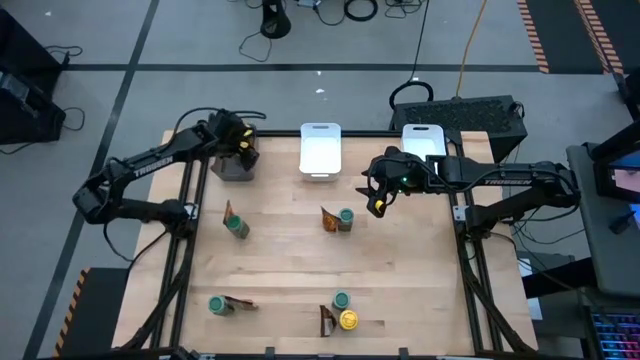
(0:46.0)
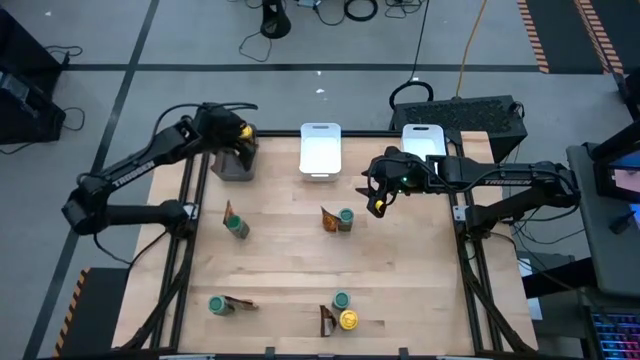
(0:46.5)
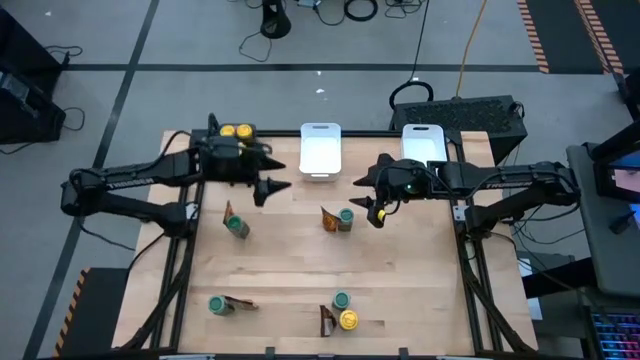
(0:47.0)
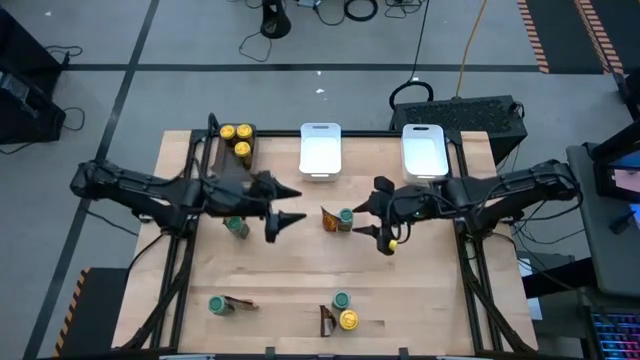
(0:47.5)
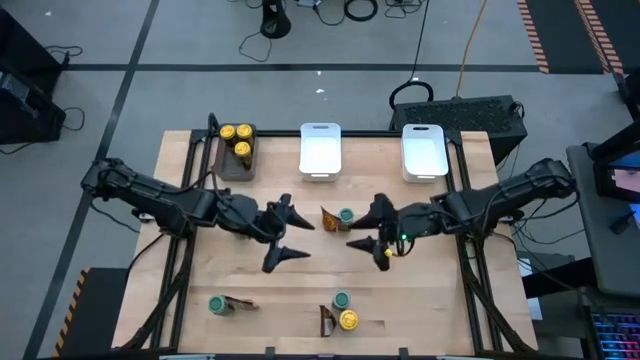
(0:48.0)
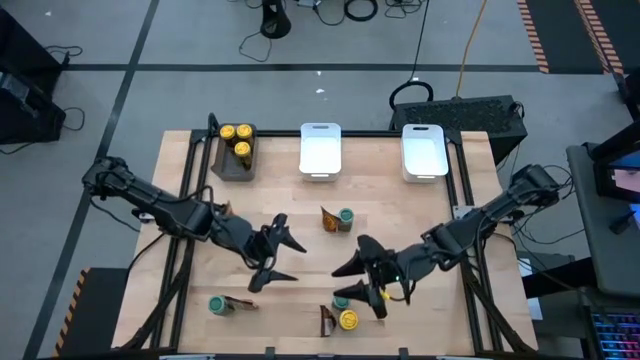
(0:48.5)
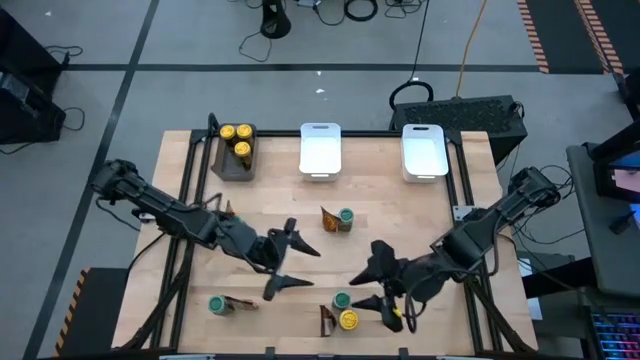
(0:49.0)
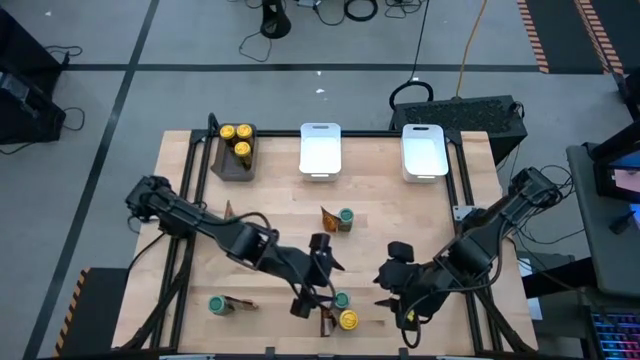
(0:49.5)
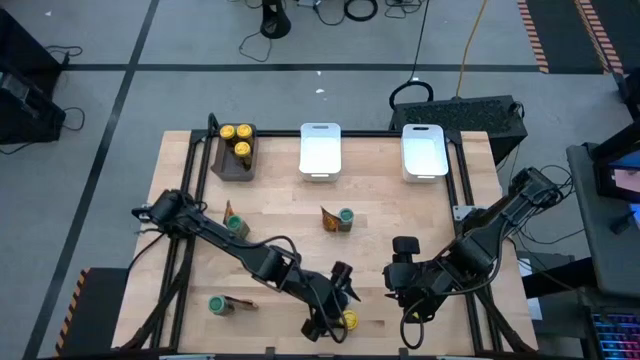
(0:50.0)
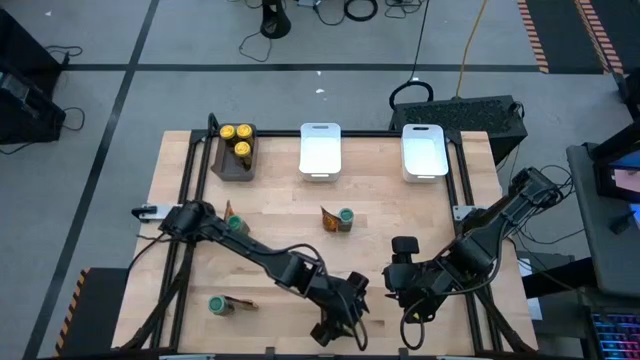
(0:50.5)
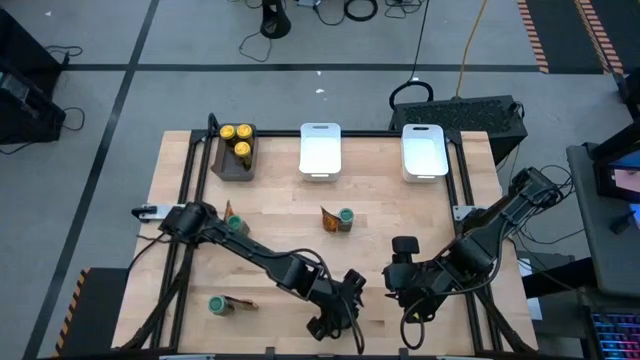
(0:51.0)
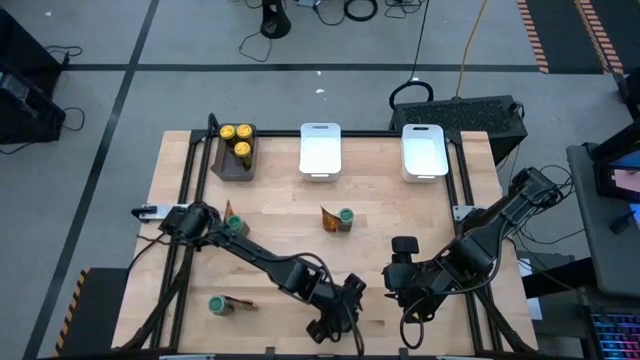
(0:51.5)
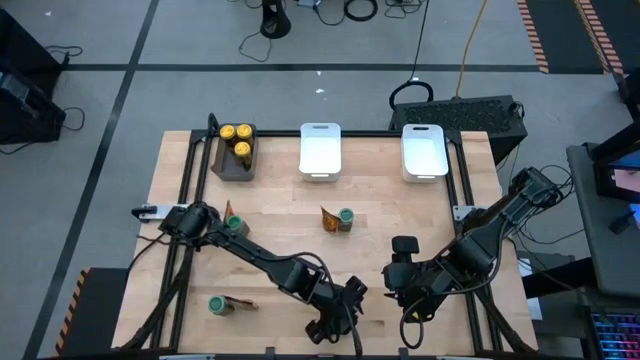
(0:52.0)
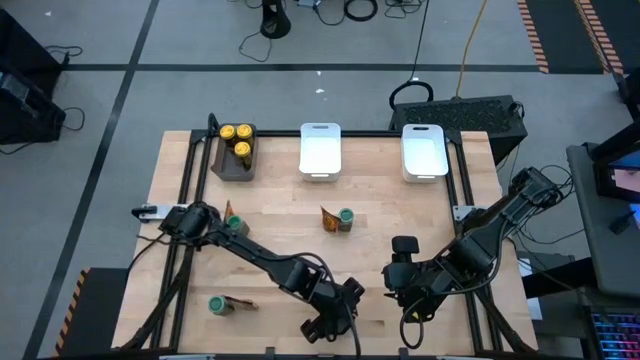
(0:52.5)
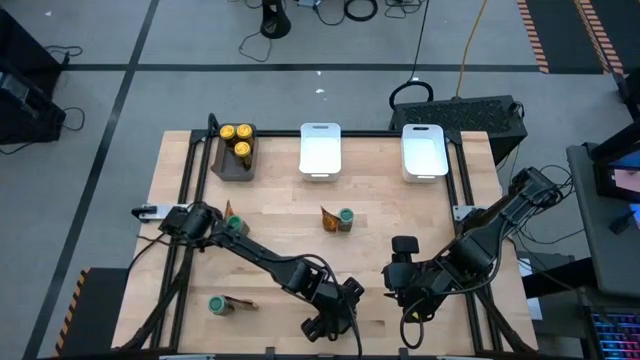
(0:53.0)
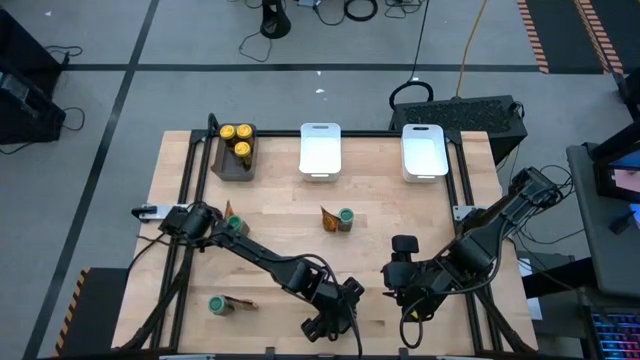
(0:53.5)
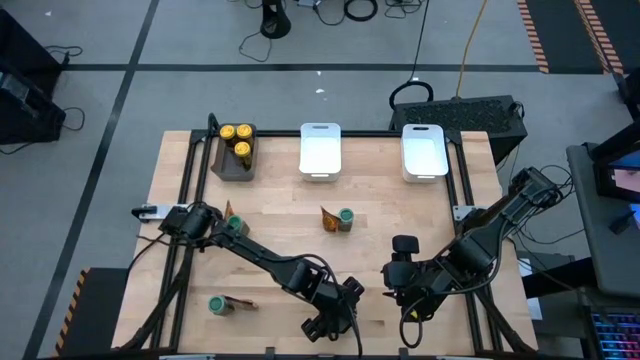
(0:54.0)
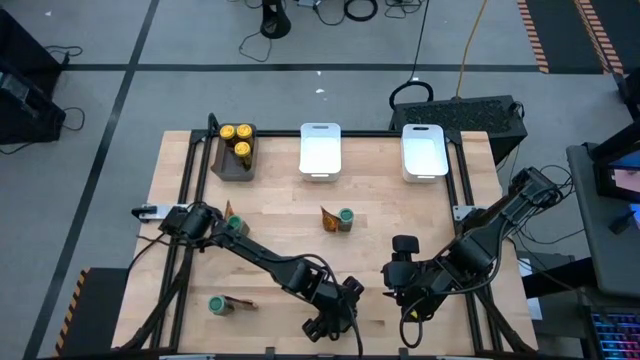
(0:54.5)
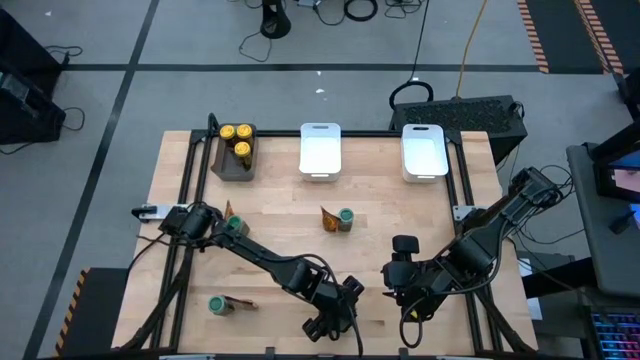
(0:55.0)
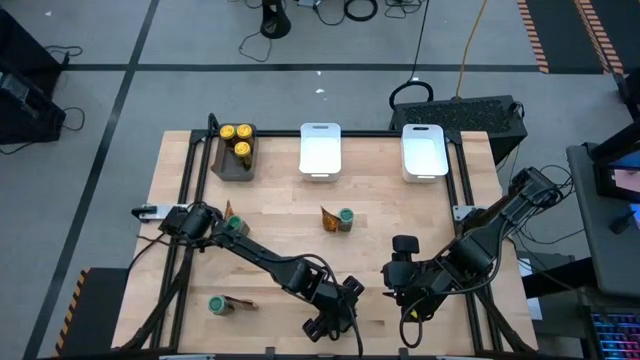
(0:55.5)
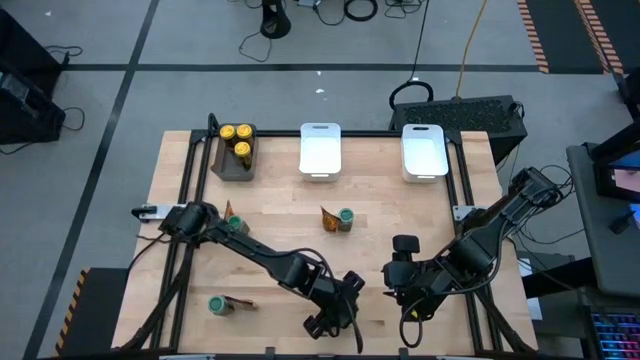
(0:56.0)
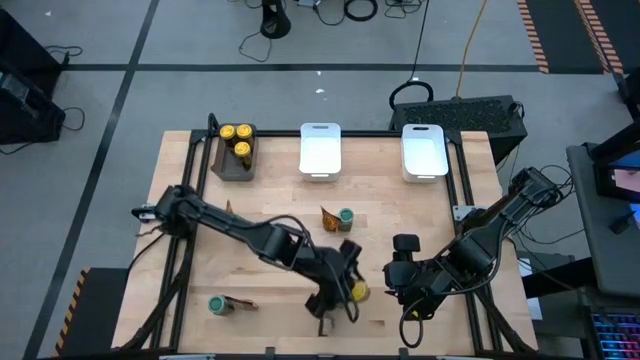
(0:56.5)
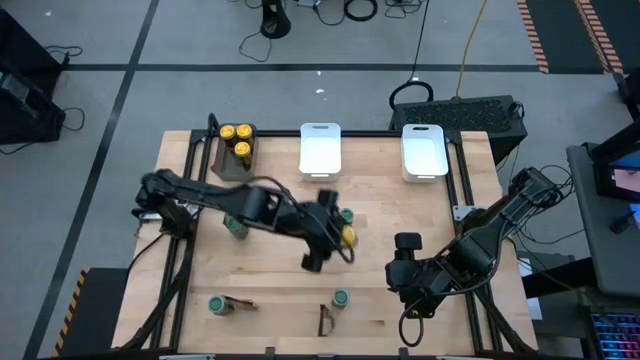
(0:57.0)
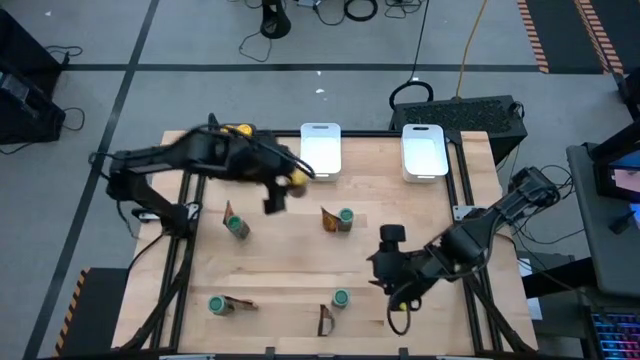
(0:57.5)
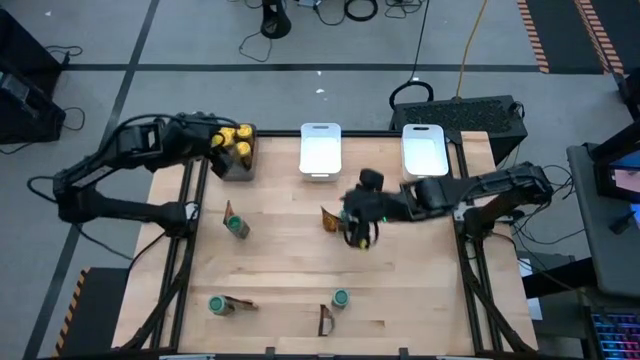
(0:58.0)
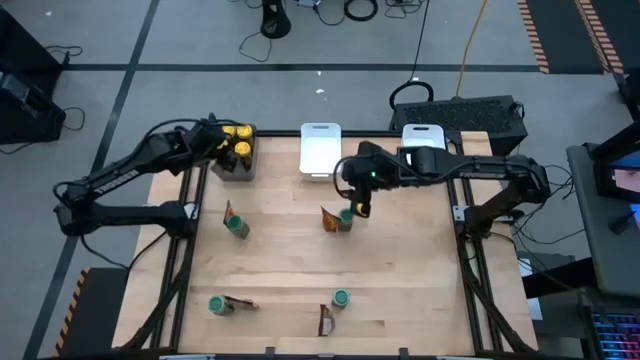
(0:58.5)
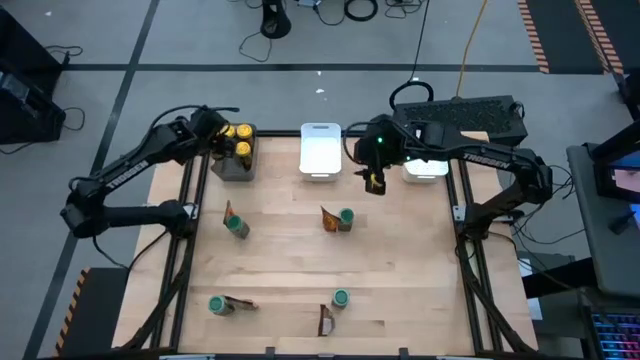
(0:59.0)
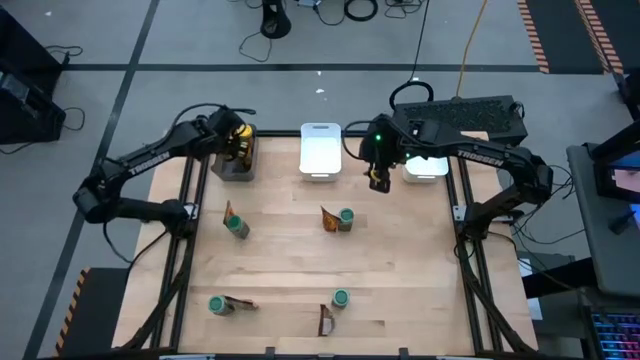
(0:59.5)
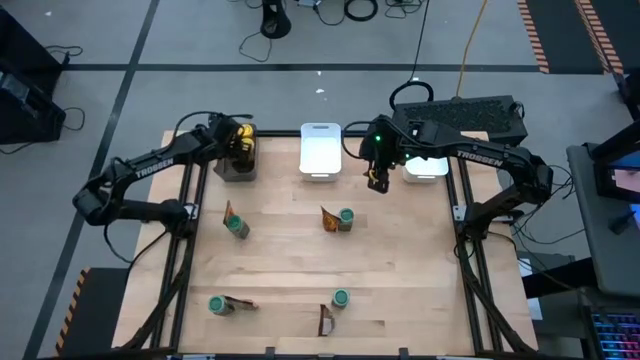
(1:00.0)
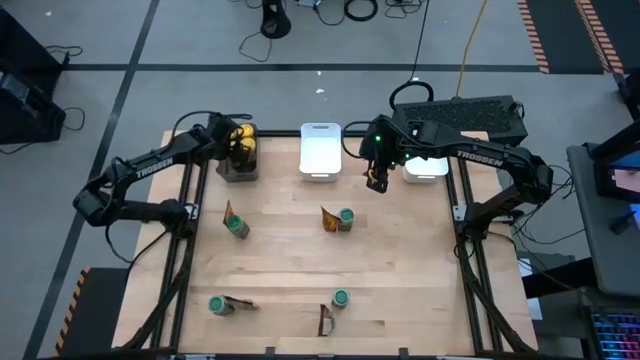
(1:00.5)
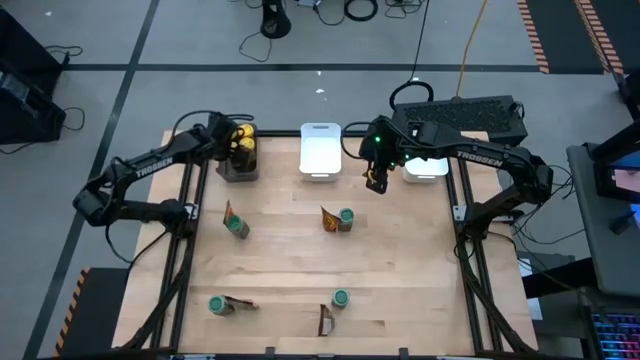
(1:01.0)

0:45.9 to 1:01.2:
Task: Sort spices by type
Put the yellow seasoning bottle into the black bin

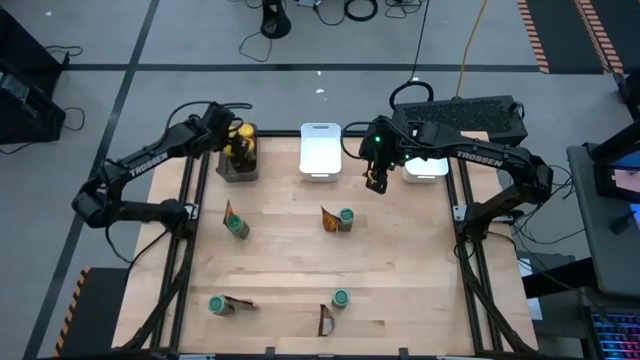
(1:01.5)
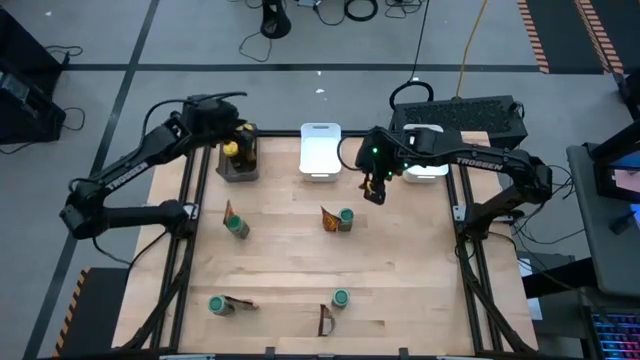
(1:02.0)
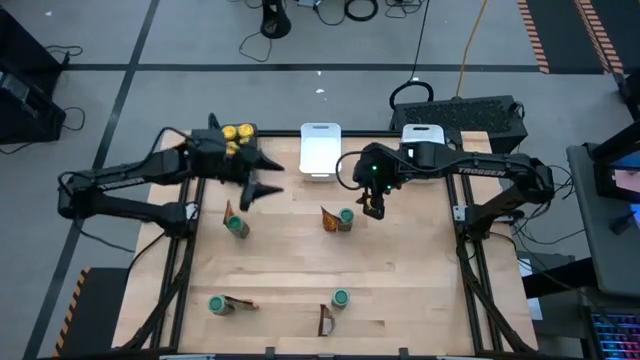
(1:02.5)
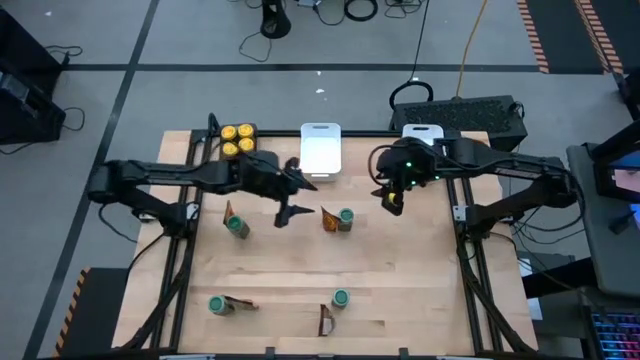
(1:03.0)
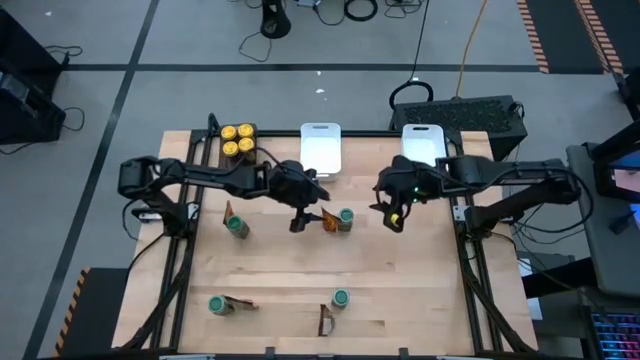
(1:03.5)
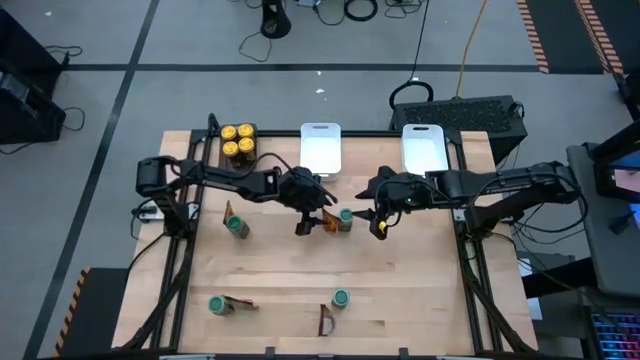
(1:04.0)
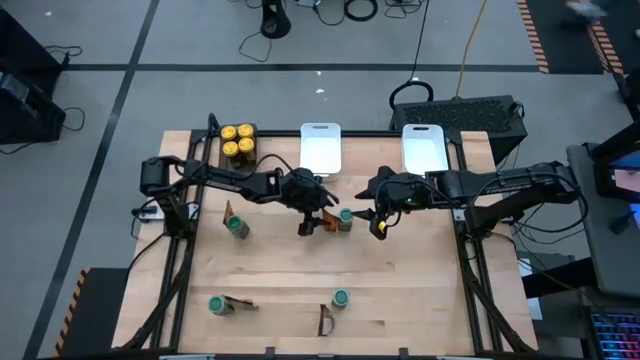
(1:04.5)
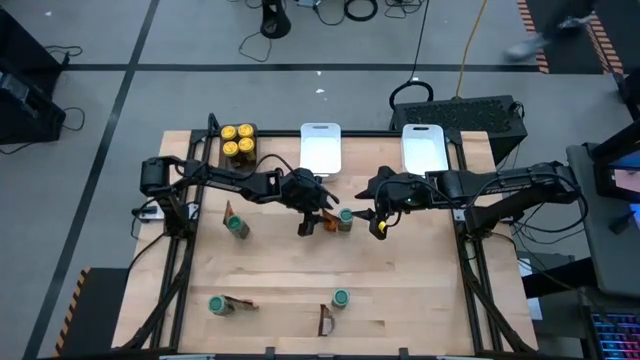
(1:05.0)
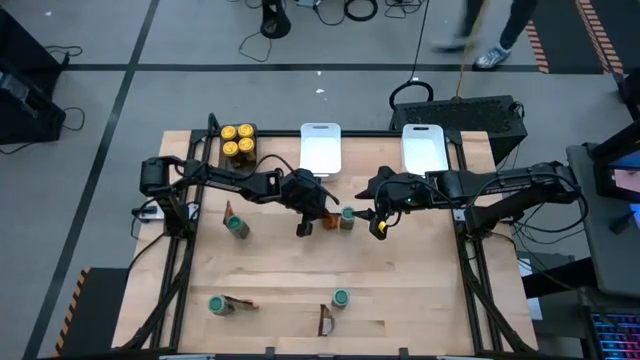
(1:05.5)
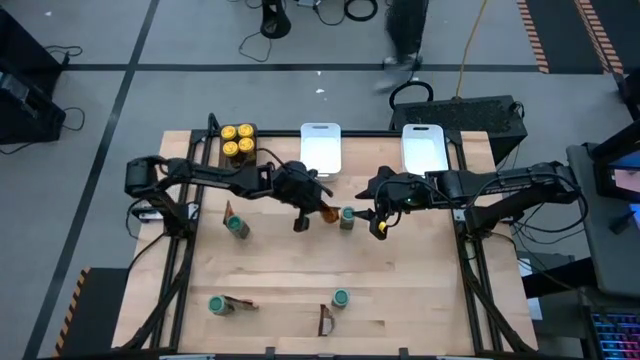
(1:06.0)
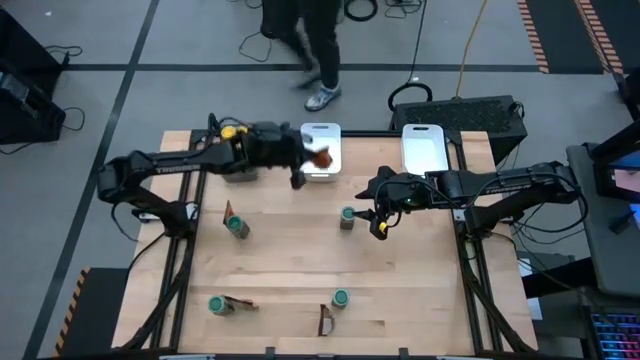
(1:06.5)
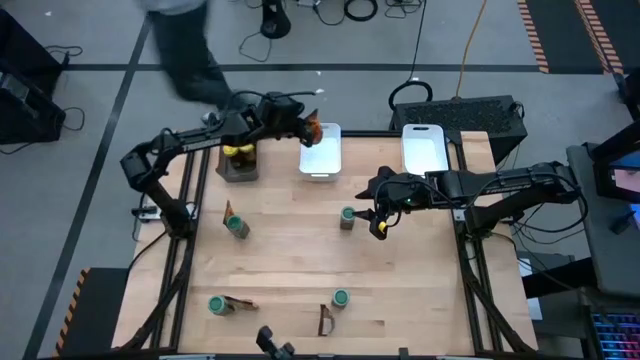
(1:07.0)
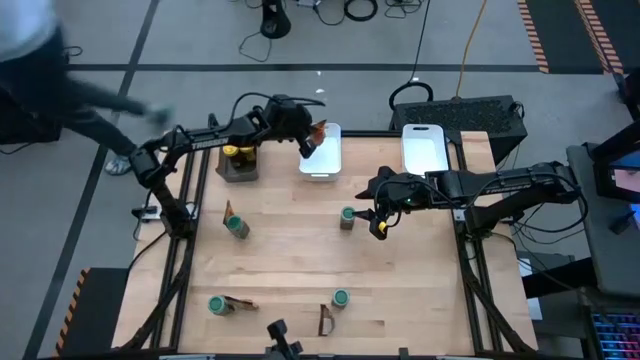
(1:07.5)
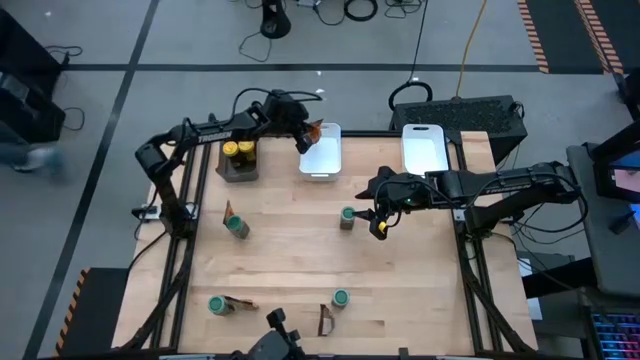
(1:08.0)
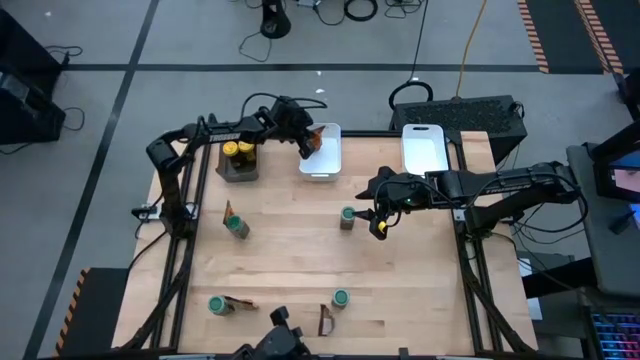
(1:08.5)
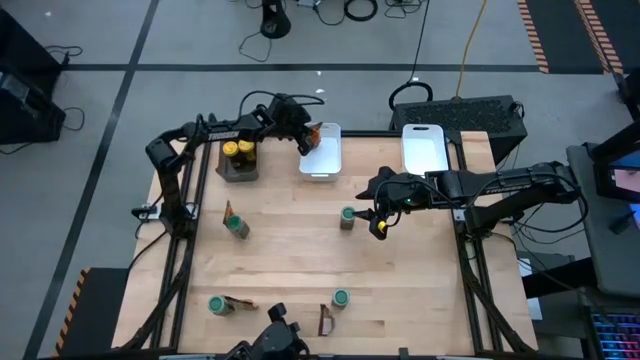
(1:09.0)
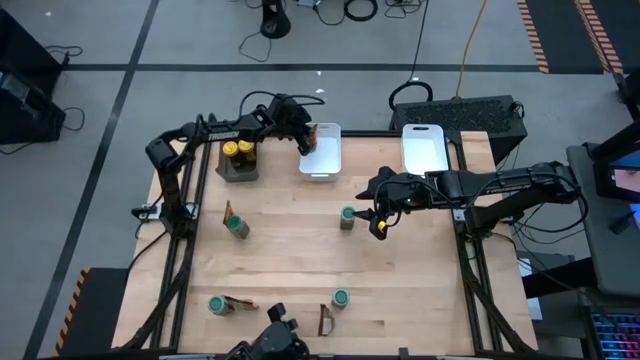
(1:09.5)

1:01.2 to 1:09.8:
Put the top right orange seasoning pack into the left white bin
